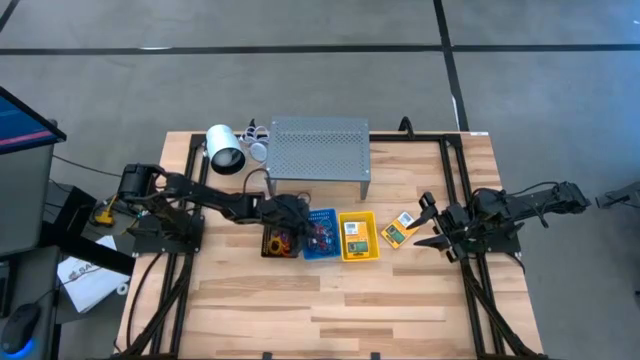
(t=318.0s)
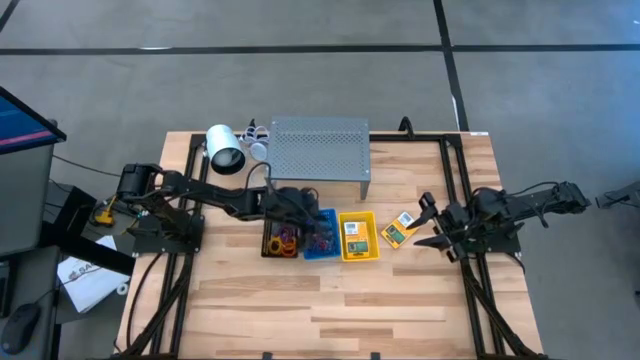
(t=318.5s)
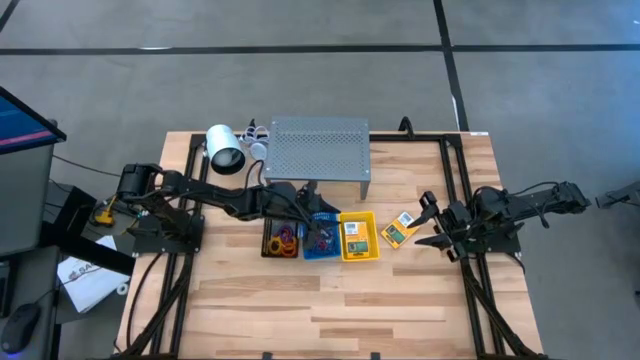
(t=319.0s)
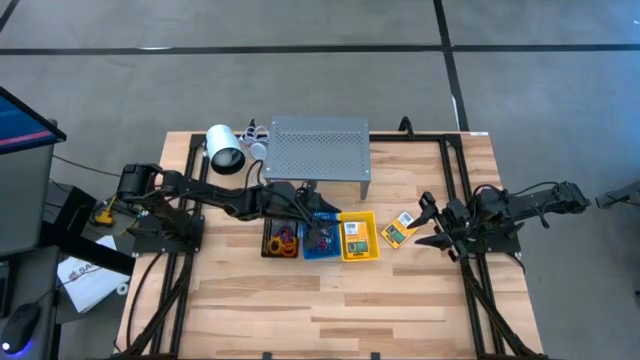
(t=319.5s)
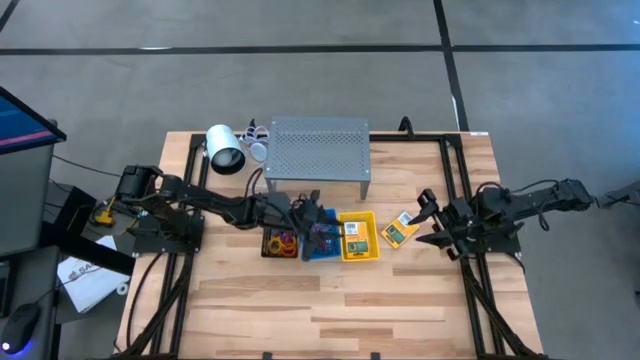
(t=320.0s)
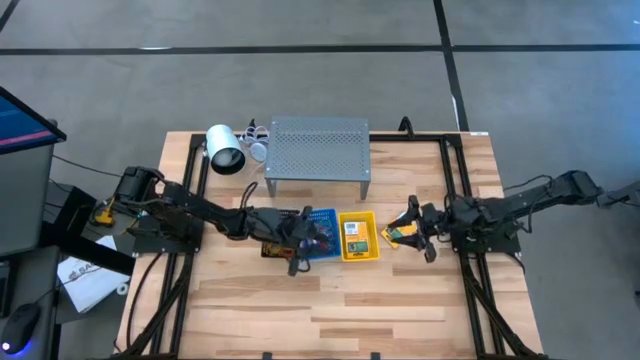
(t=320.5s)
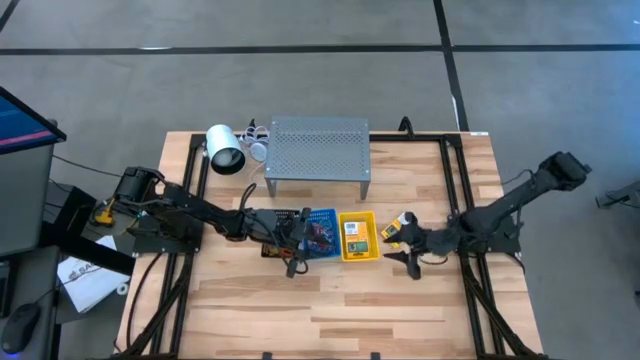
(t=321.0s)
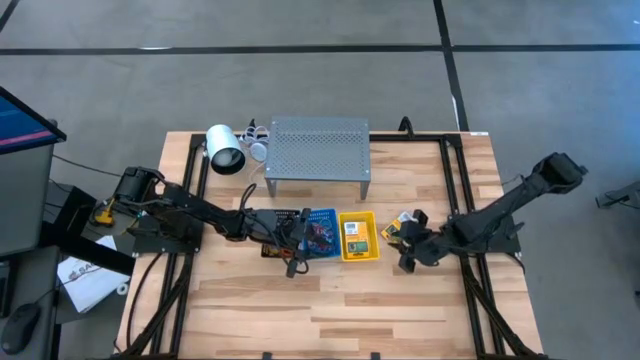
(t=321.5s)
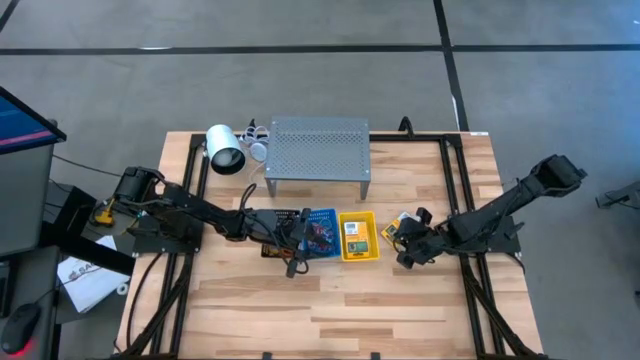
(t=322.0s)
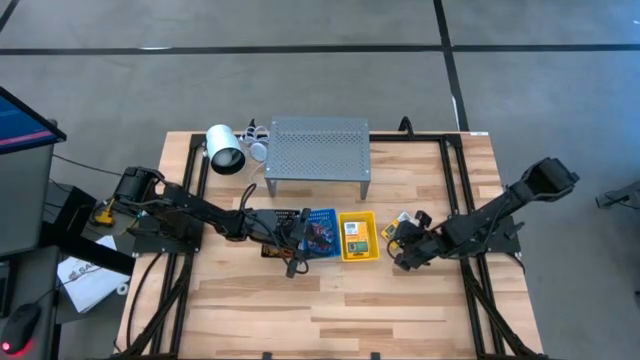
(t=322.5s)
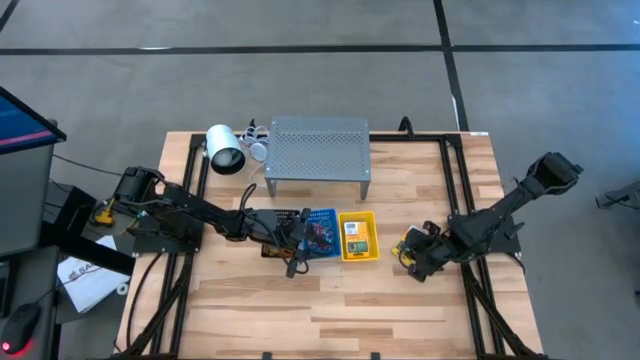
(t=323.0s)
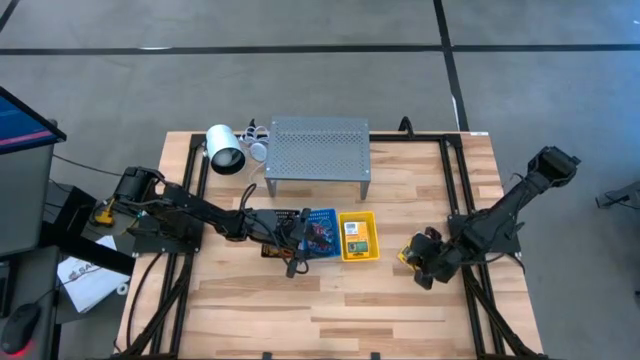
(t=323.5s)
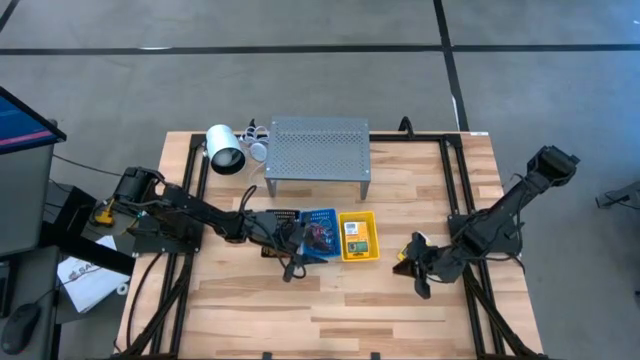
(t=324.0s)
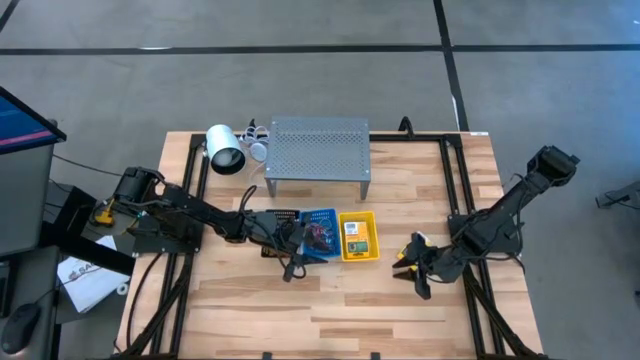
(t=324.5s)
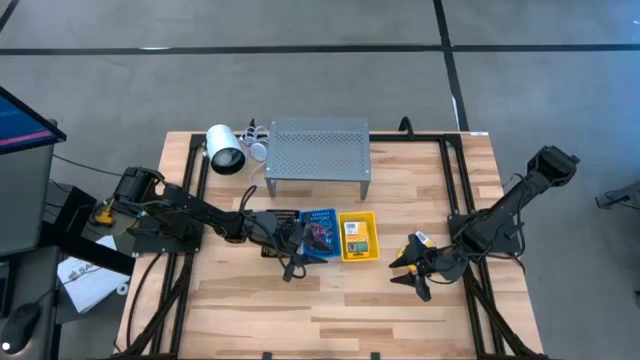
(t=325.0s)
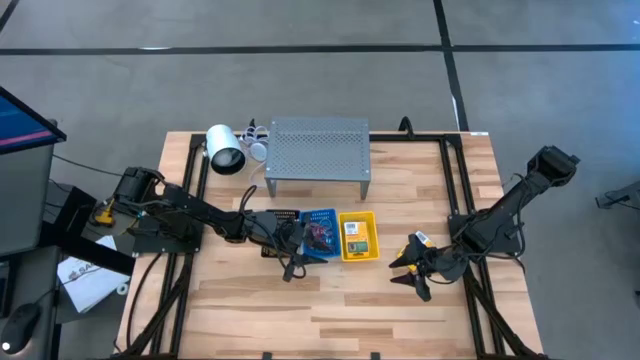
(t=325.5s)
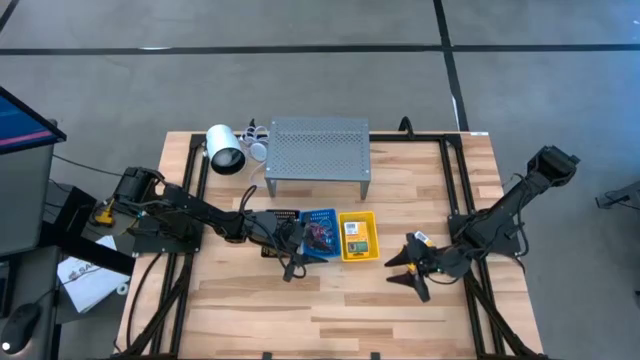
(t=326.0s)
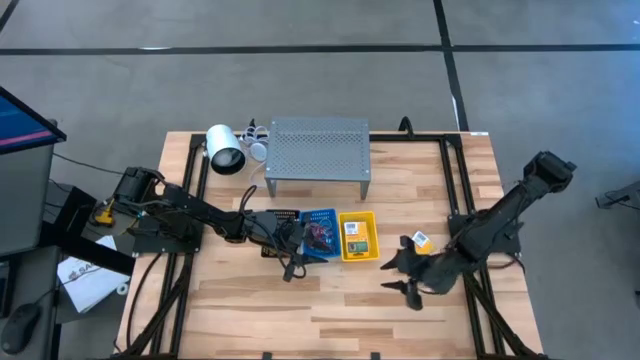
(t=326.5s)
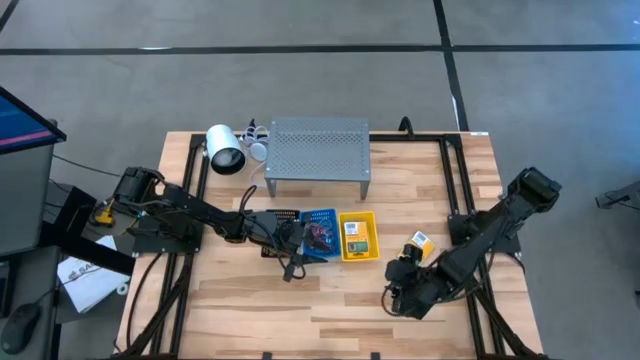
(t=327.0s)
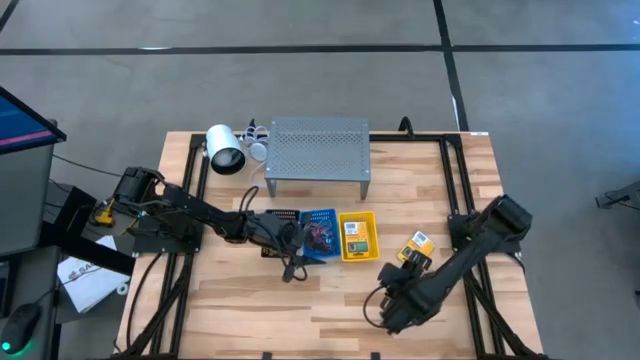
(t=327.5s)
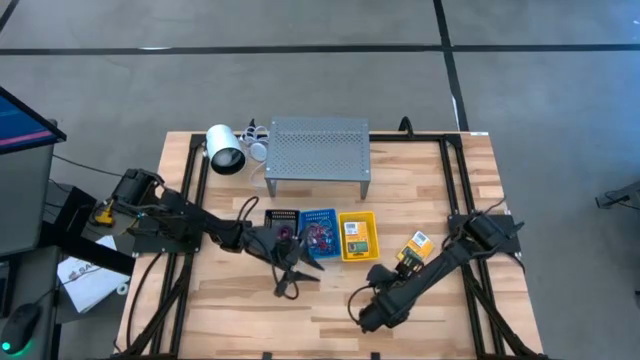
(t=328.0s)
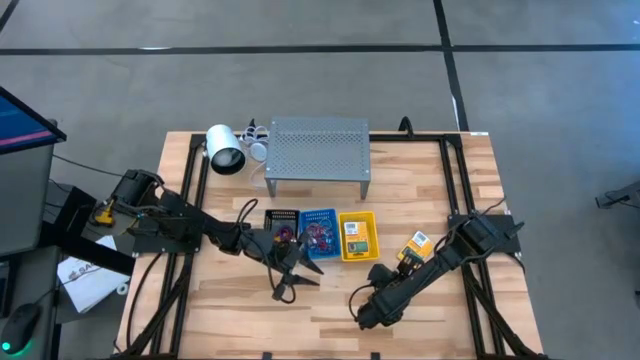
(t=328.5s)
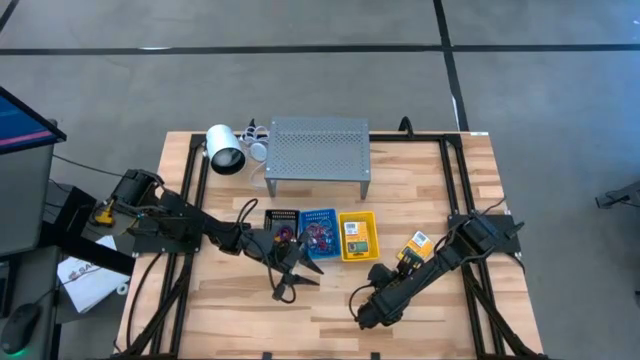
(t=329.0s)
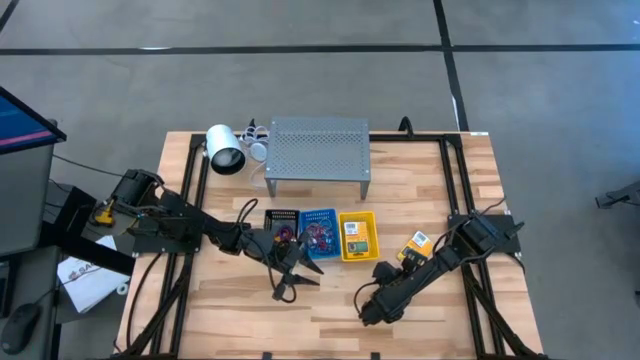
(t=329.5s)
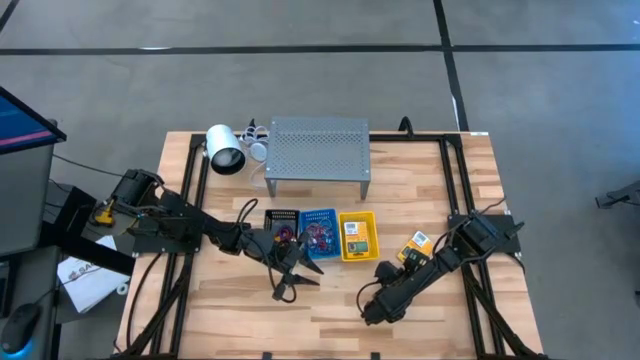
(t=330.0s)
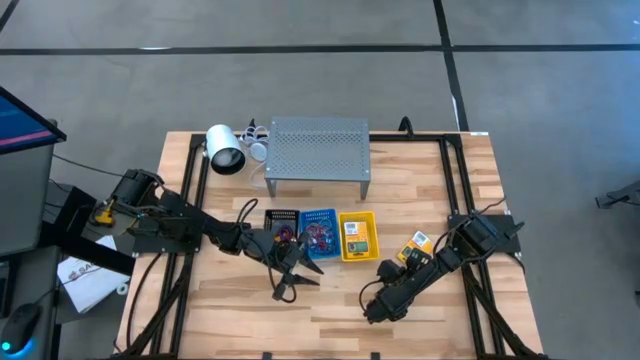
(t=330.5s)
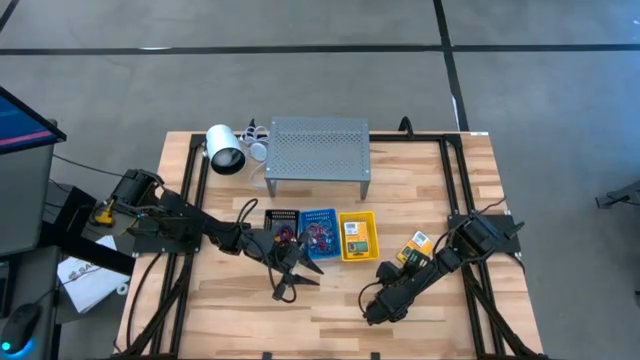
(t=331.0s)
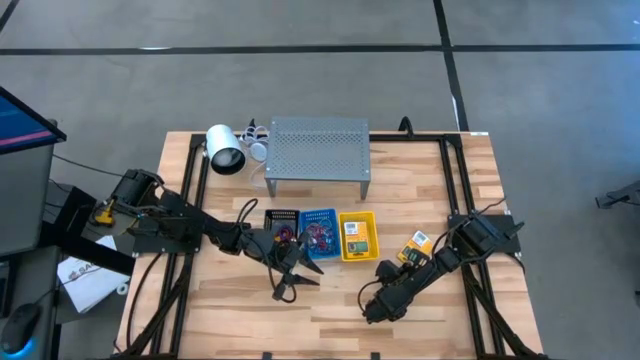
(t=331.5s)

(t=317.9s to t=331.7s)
Task: Pick & Place Office Desk Supplies
Put the yellow crayon box into the yellow basket

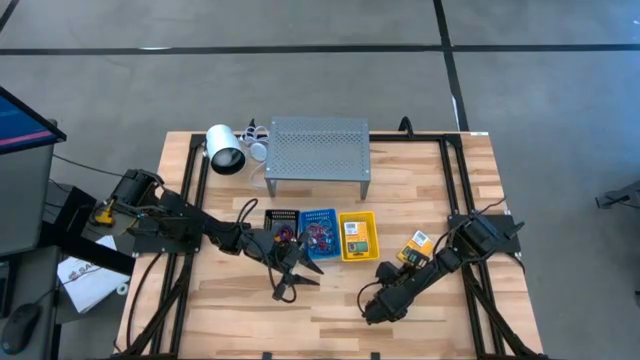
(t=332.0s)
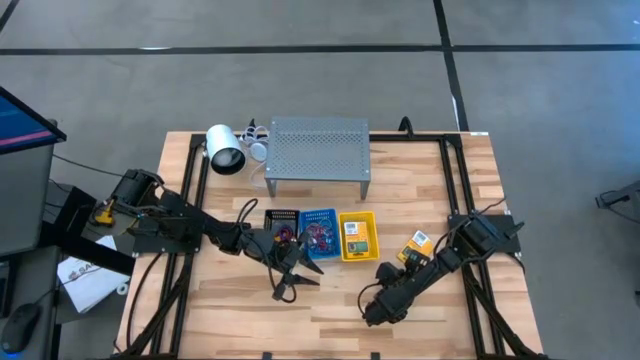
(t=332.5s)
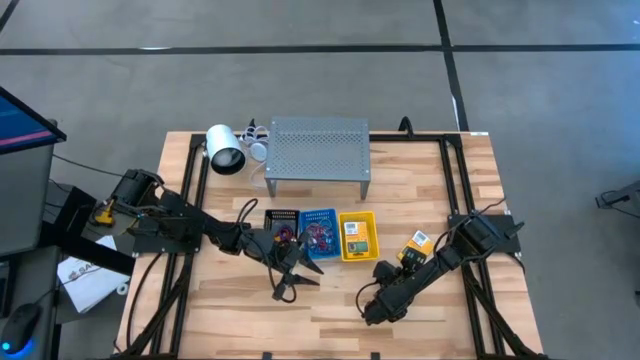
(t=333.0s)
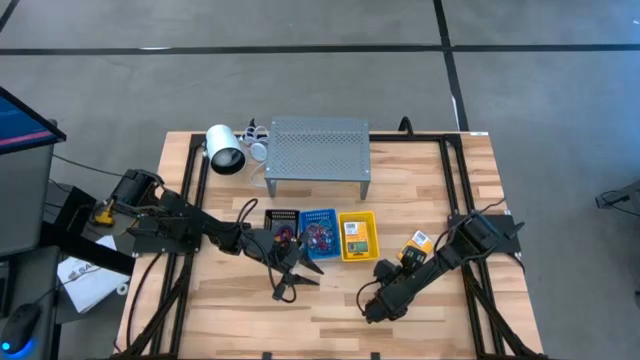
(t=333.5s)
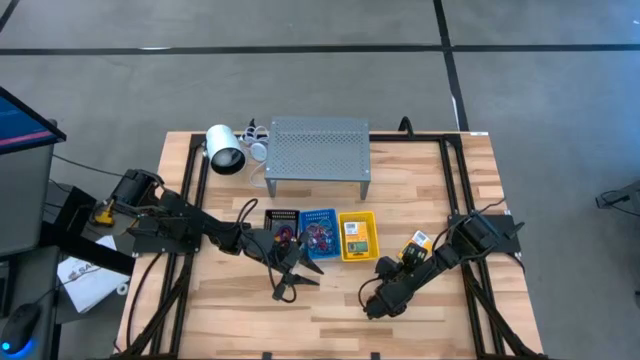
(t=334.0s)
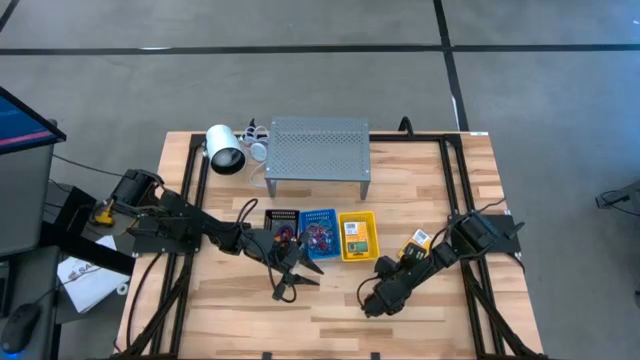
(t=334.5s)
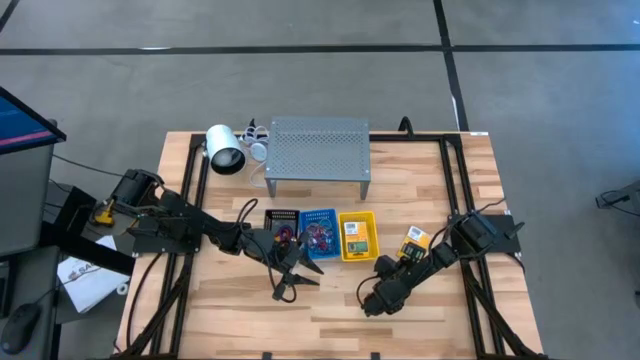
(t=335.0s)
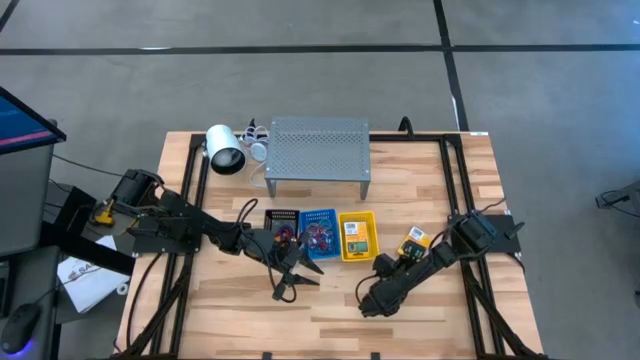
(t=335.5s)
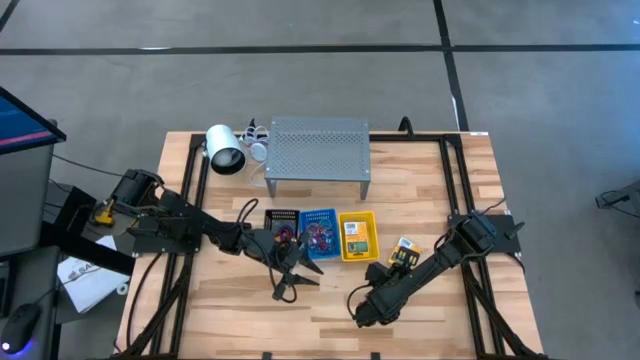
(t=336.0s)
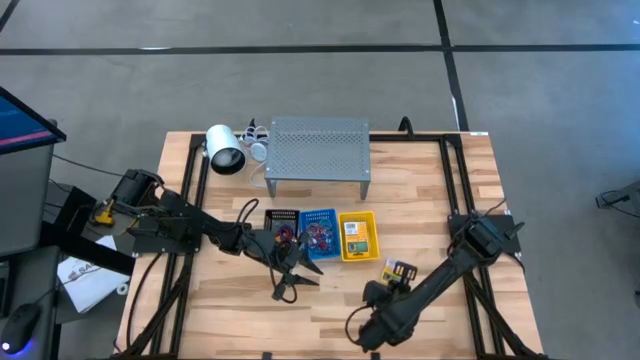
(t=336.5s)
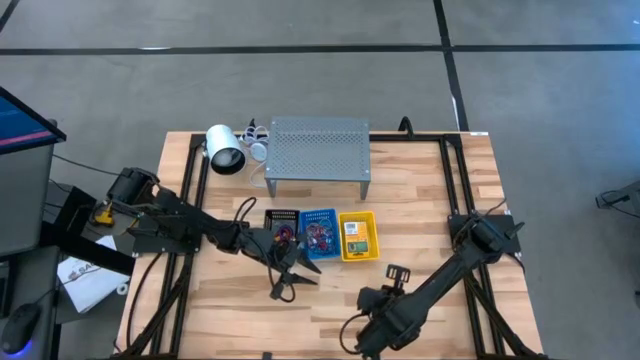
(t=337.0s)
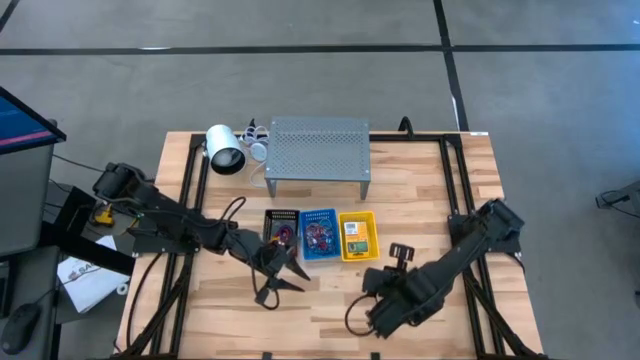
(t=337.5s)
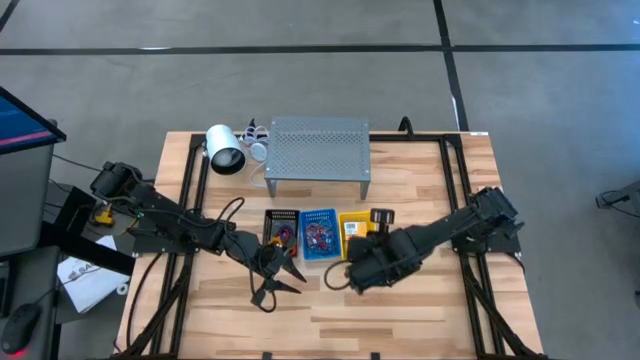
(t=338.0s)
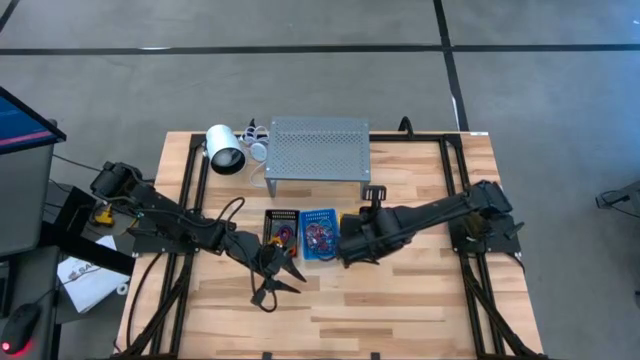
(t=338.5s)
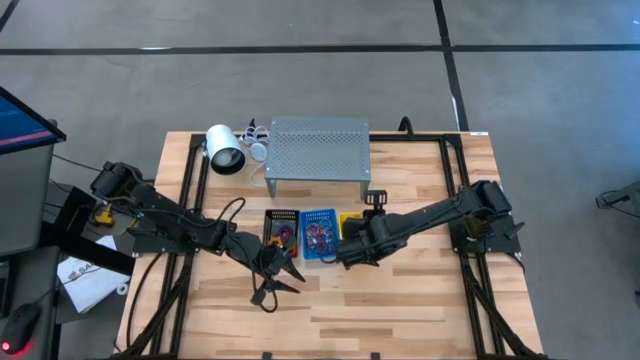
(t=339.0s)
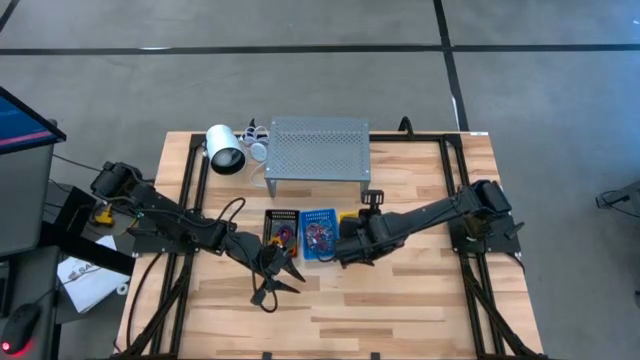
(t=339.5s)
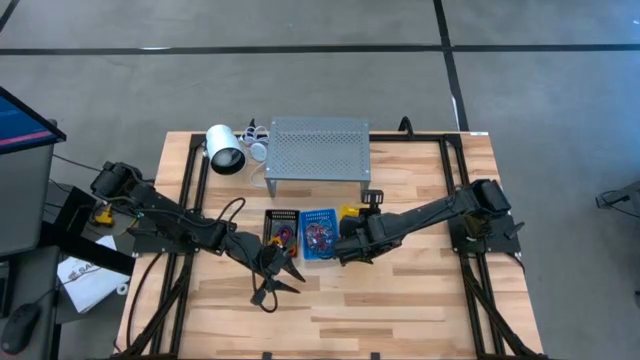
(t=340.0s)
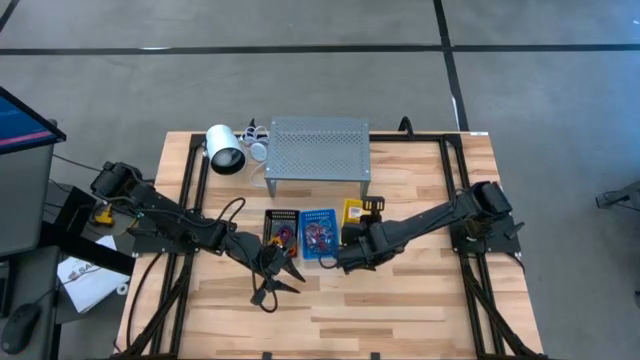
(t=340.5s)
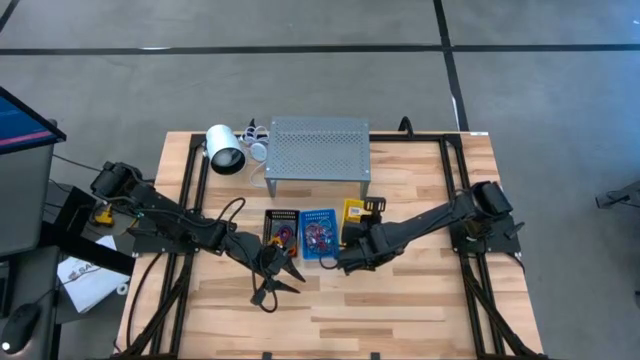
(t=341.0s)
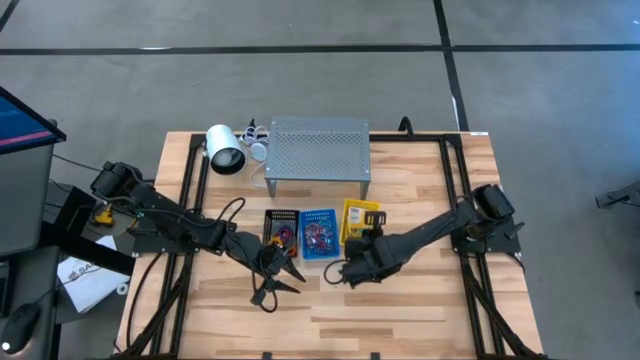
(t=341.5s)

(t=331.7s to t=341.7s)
Put the yellow crayon box into the yellow basket
